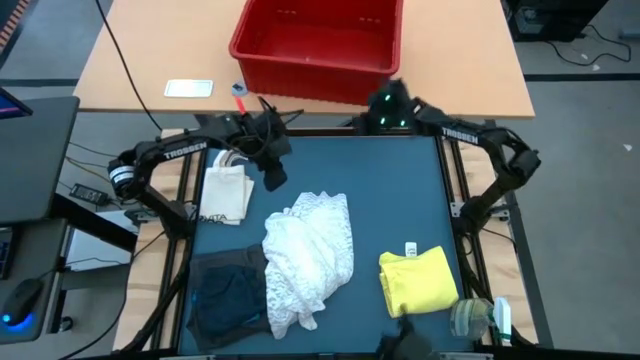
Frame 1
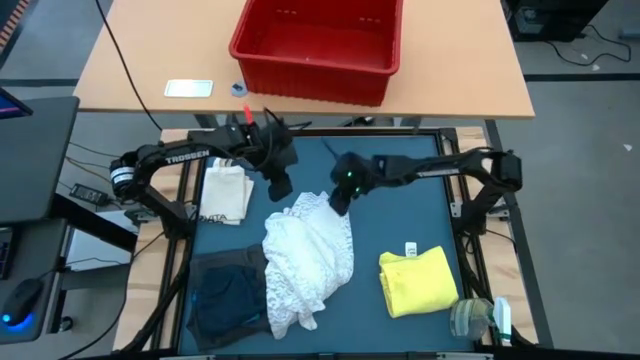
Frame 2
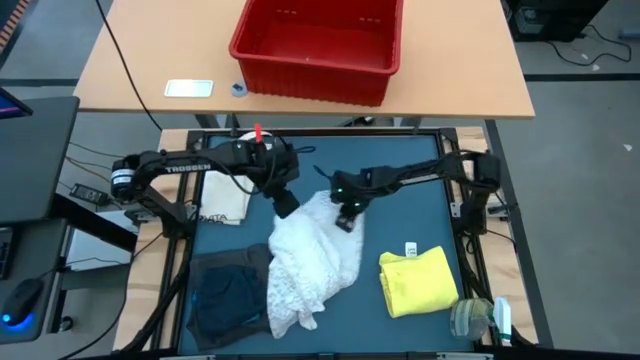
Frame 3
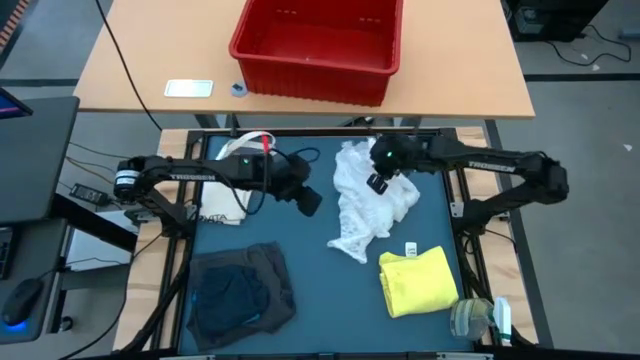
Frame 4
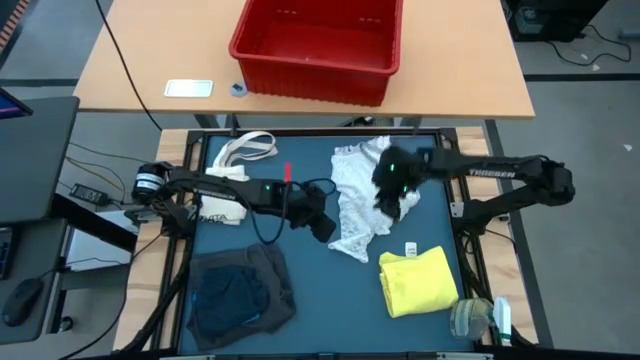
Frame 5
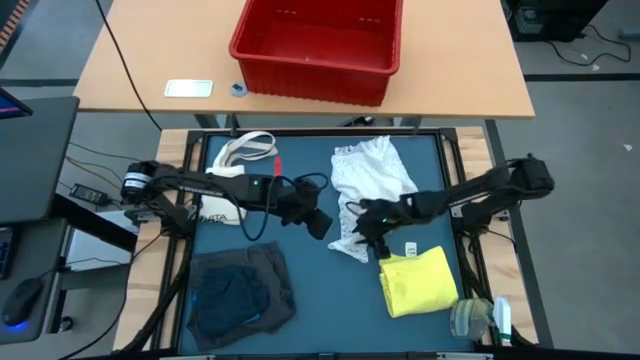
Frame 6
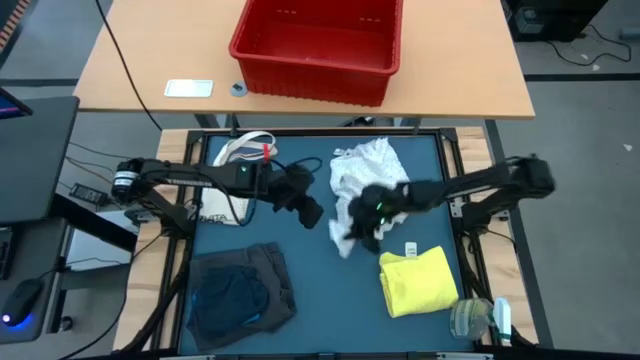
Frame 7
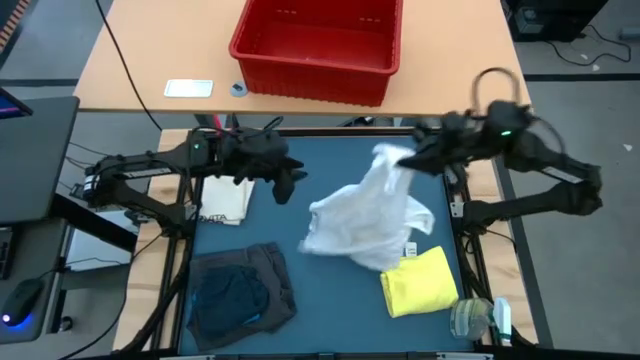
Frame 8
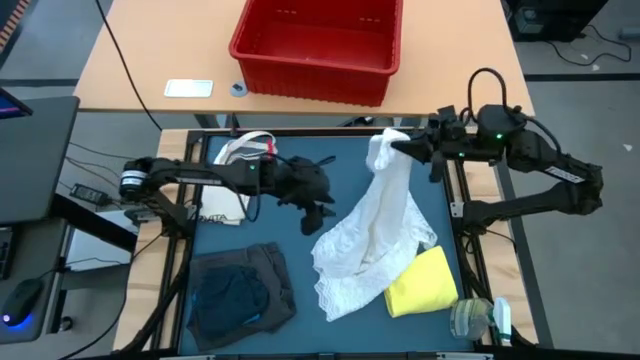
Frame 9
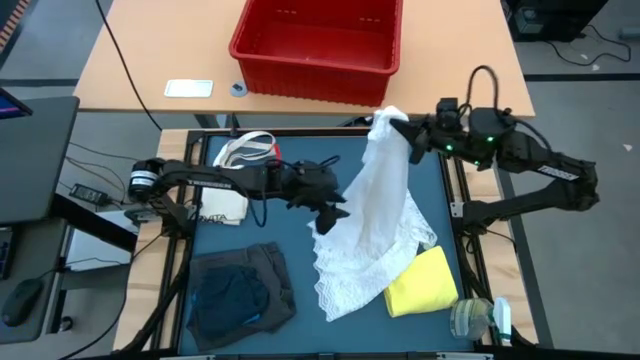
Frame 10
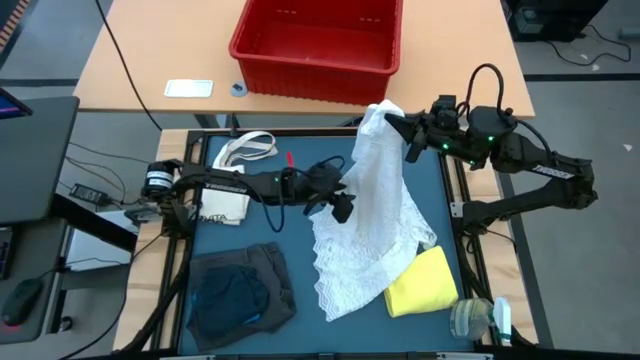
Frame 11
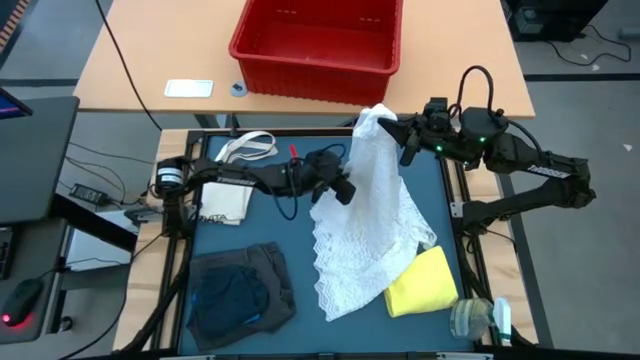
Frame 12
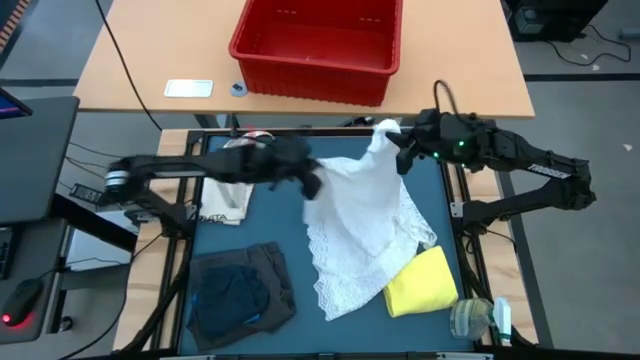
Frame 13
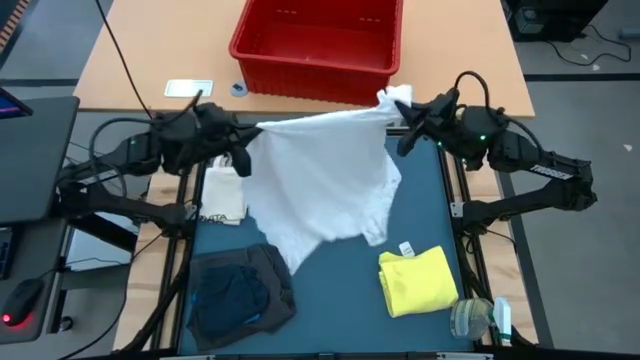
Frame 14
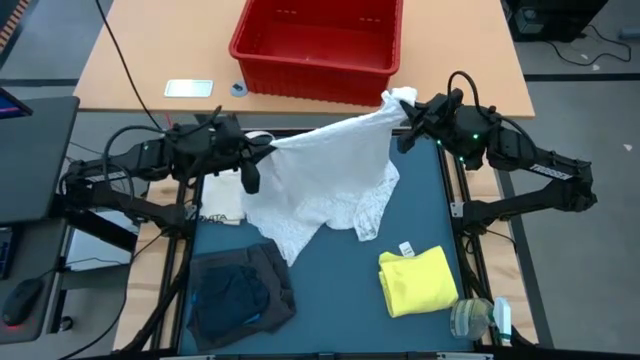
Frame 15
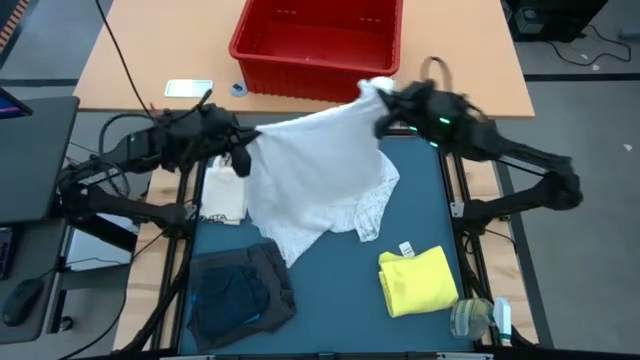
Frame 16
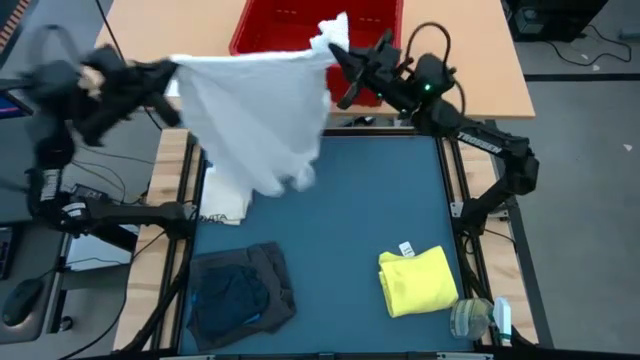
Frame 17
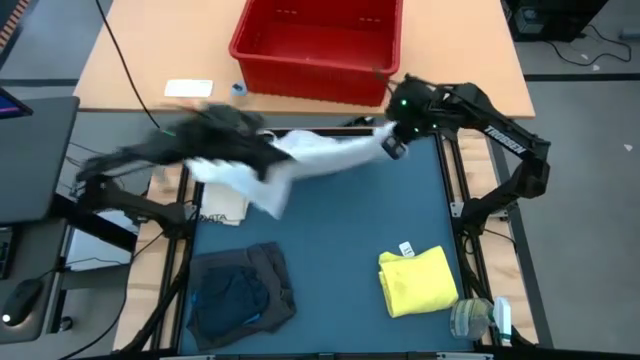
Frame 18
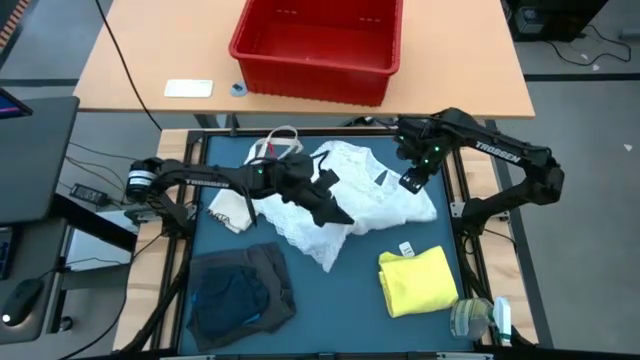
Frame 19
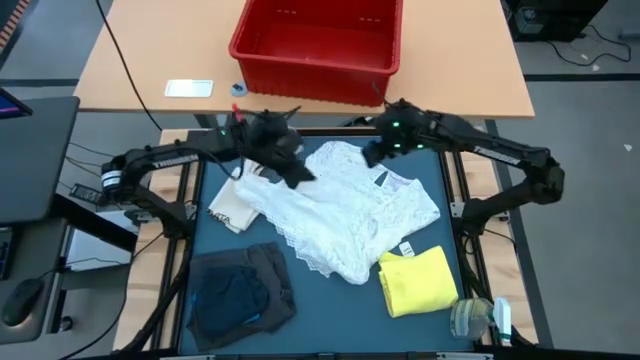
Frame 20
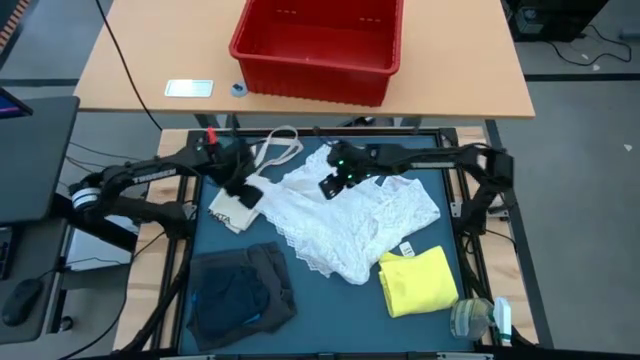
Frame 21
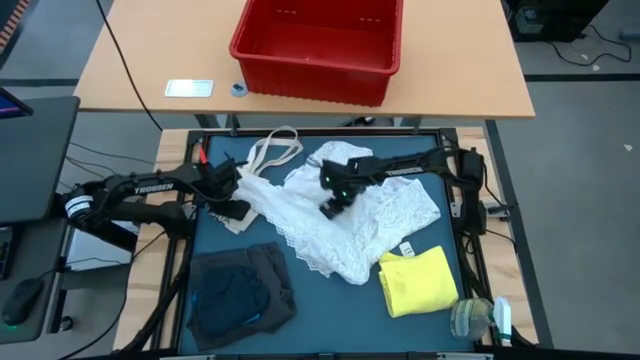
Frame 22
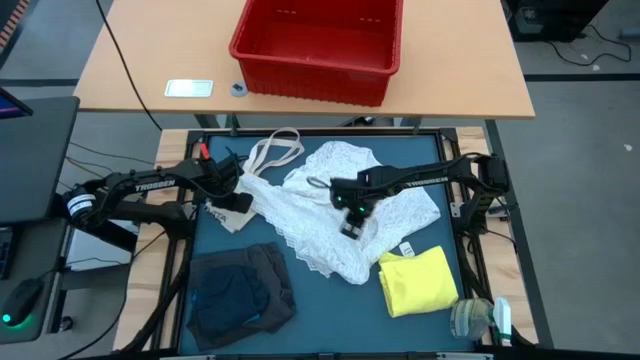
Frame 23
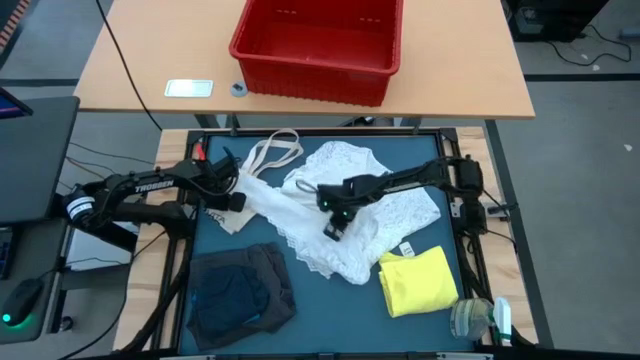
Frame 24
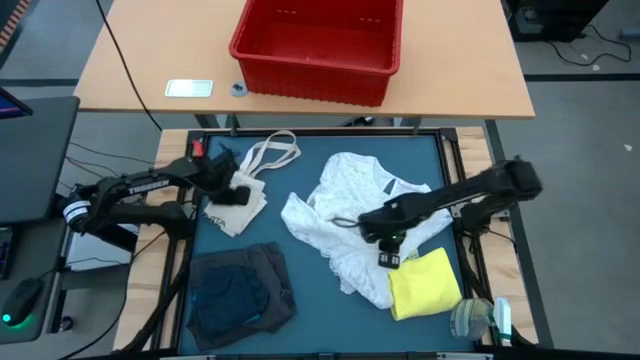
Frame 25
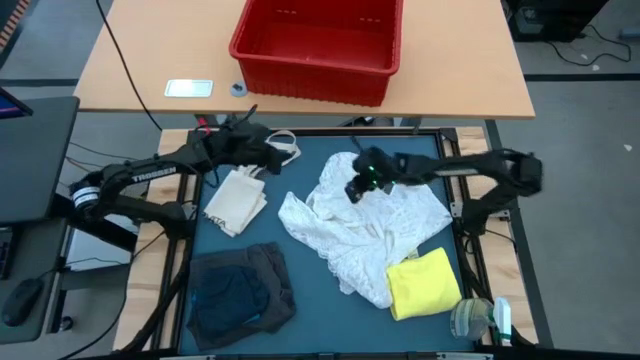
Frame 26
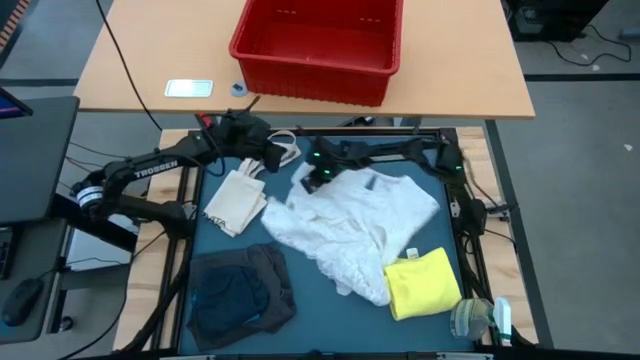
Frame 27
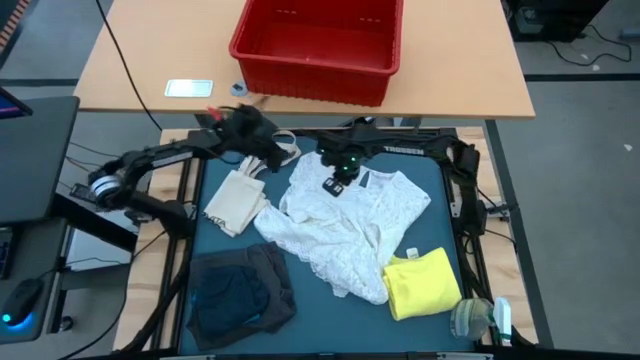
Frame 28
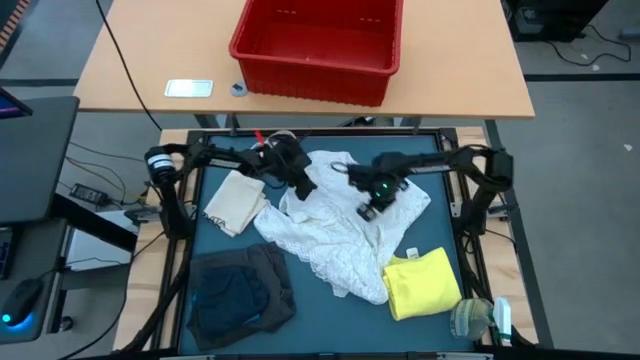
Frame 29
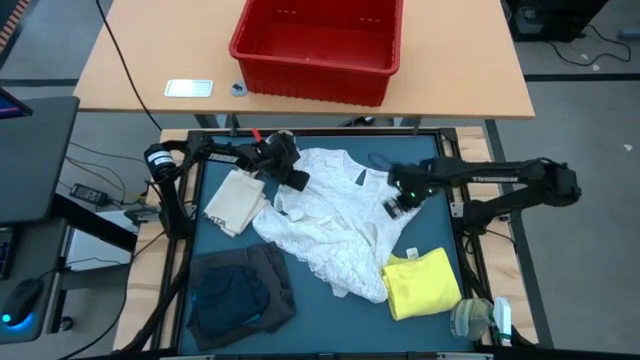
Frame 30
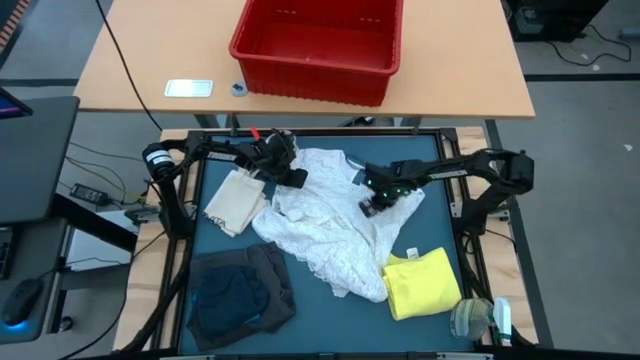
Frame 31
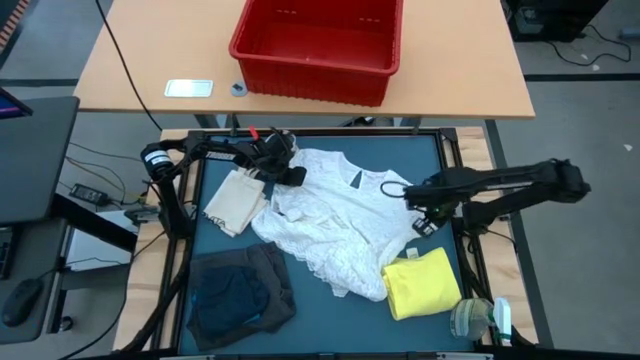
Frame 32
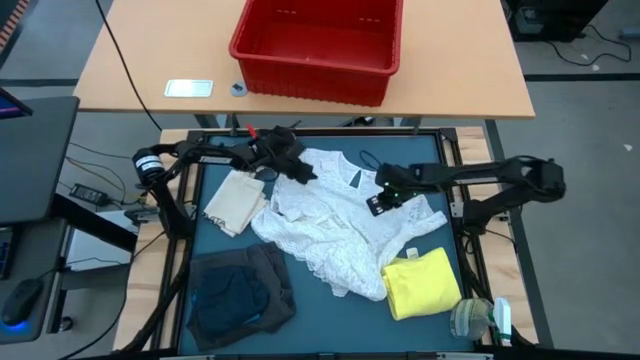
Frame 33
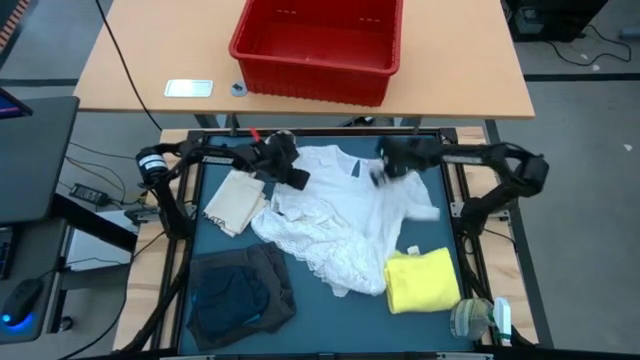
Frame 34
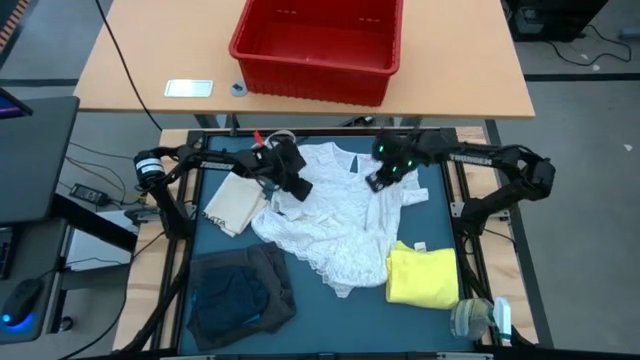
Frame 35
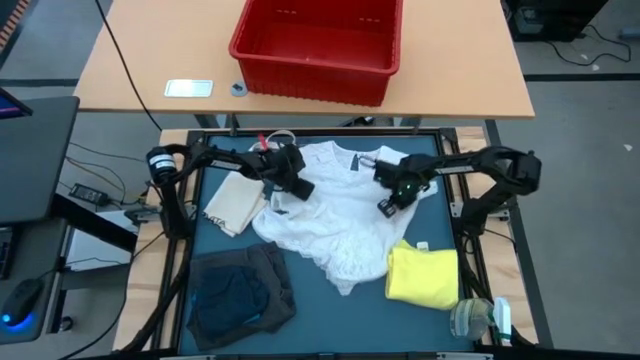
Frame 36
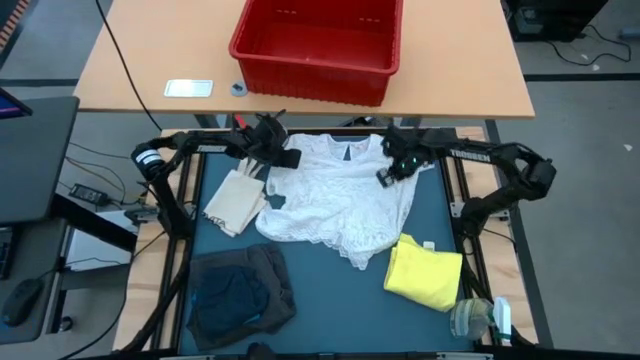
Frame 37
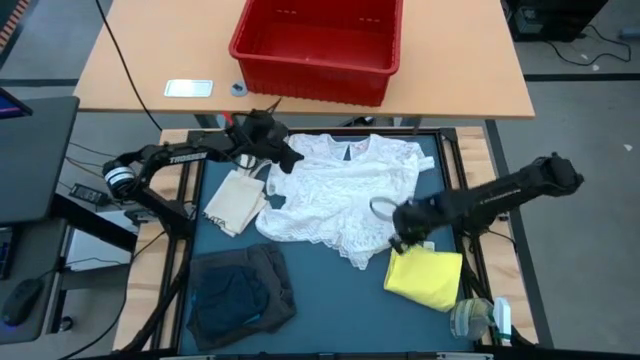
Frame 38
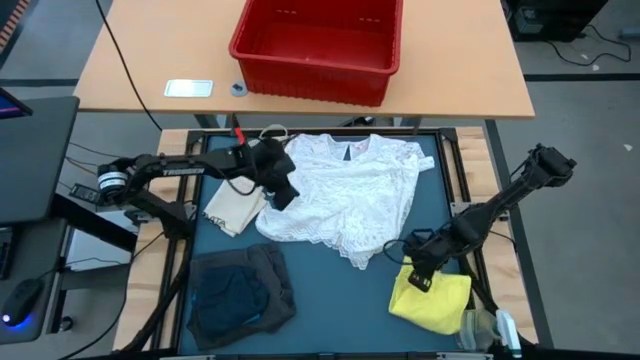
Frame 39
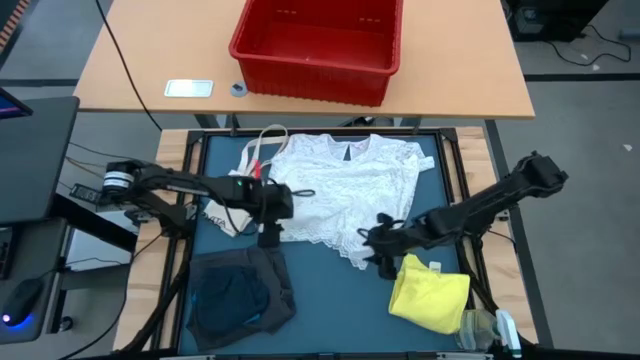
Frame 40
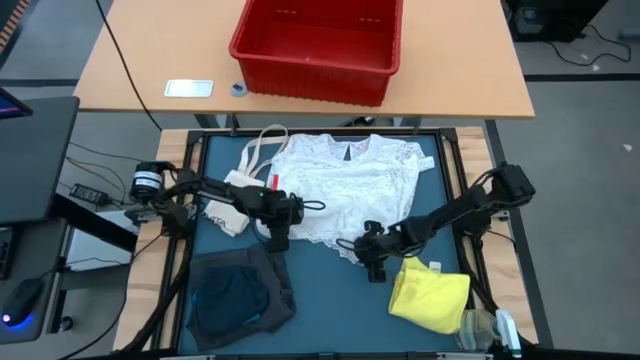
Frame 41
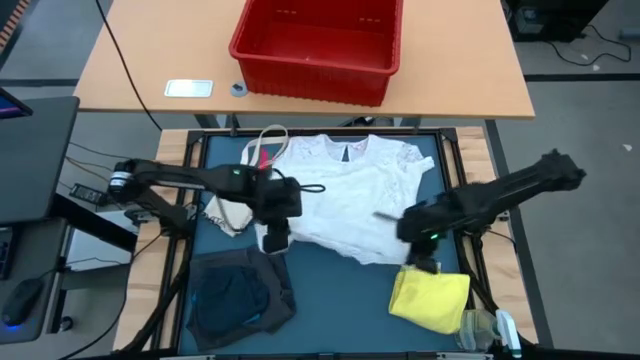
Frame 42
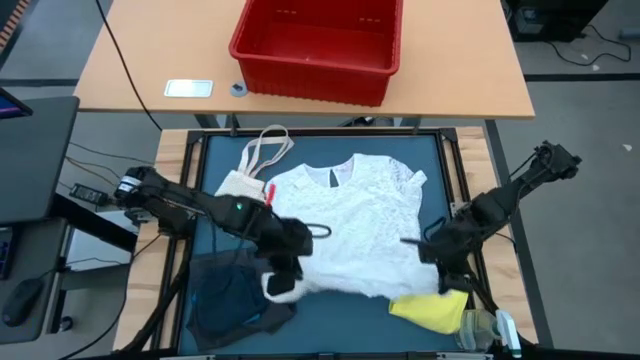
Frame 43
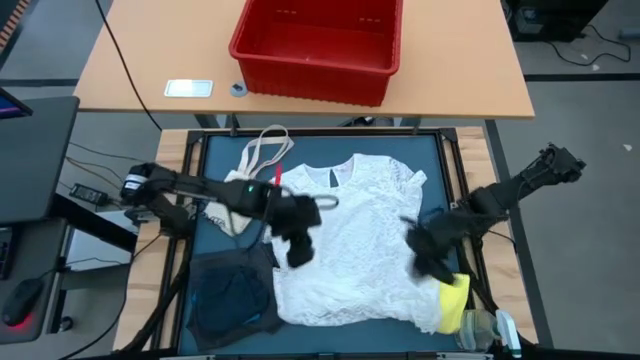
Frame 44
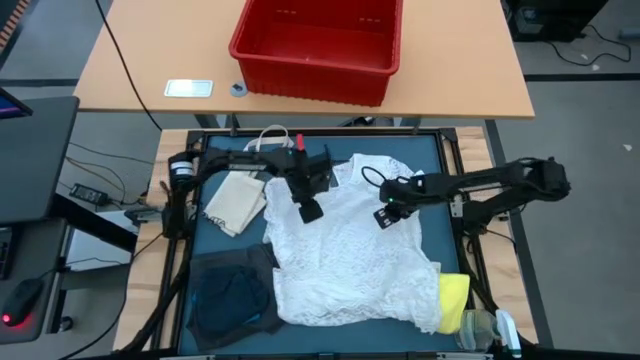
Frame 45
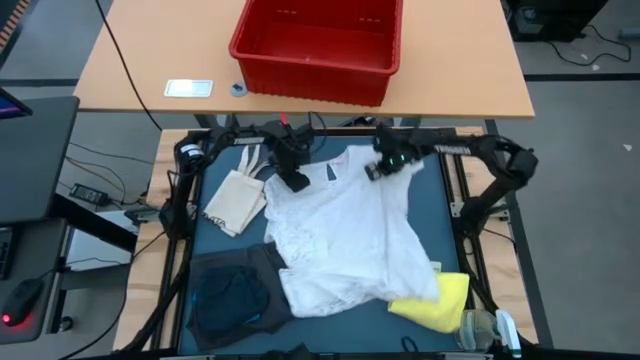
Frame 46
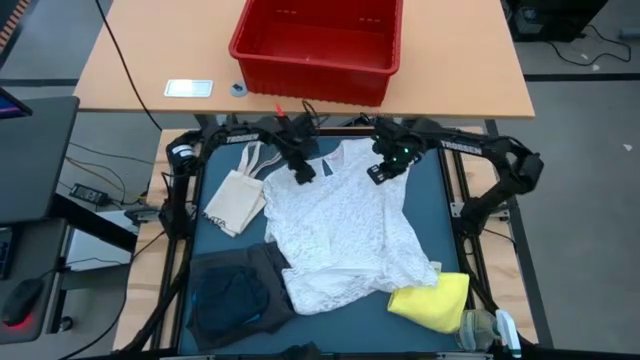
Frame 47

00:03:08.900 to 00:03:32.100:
Task: Fold laundry
Fold the white shirt
